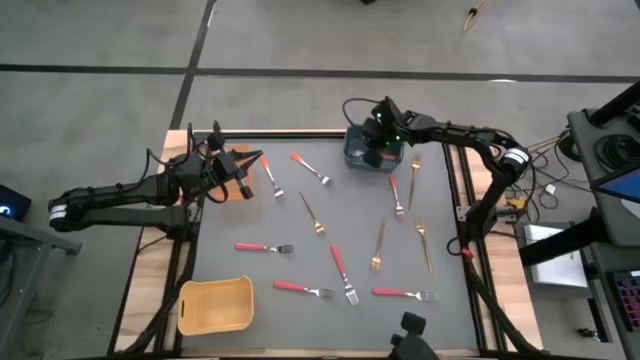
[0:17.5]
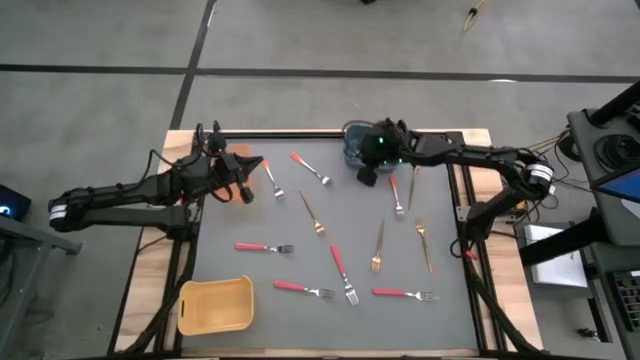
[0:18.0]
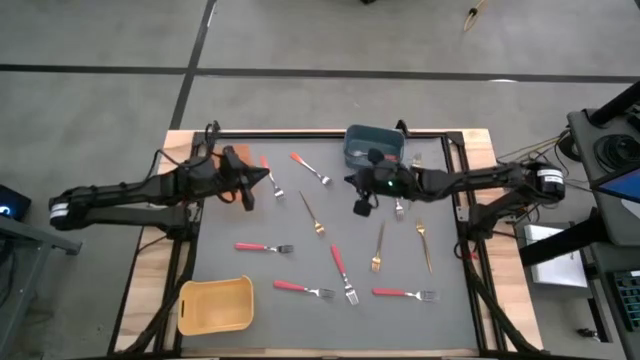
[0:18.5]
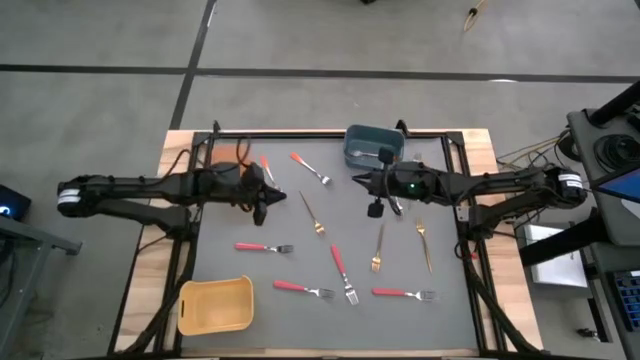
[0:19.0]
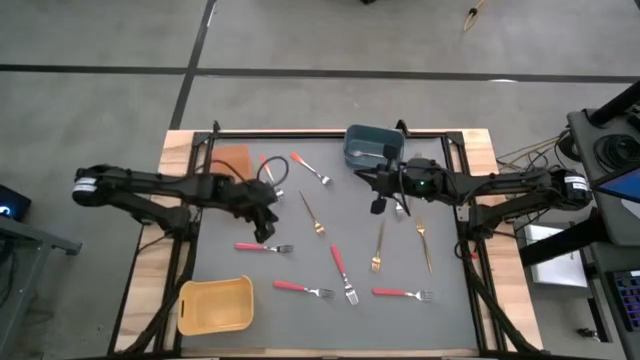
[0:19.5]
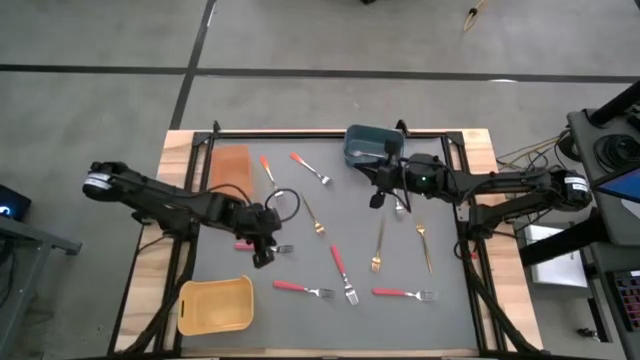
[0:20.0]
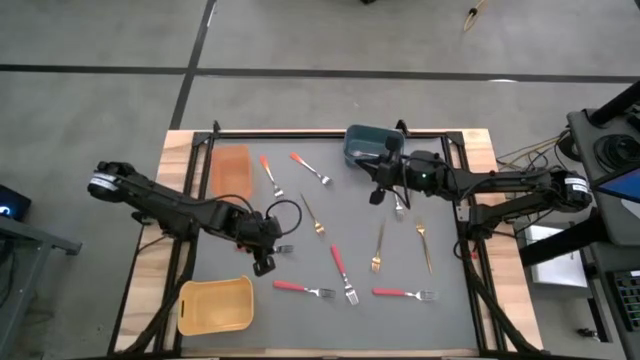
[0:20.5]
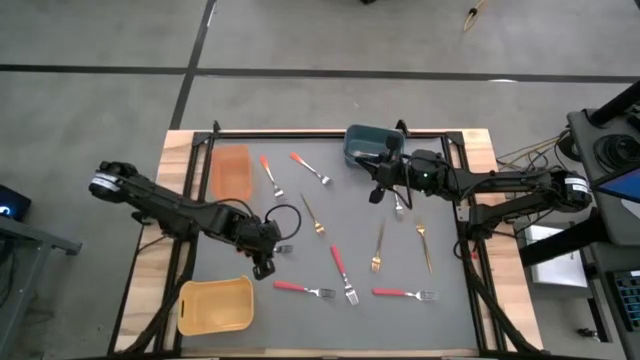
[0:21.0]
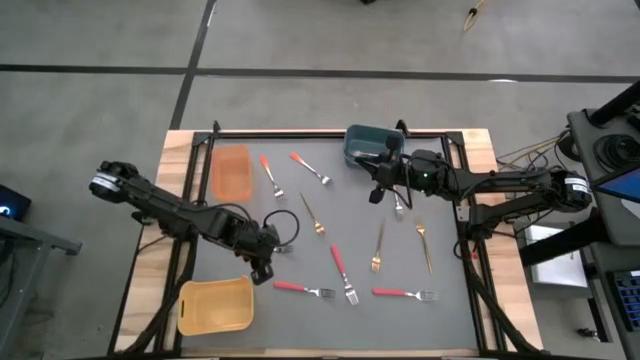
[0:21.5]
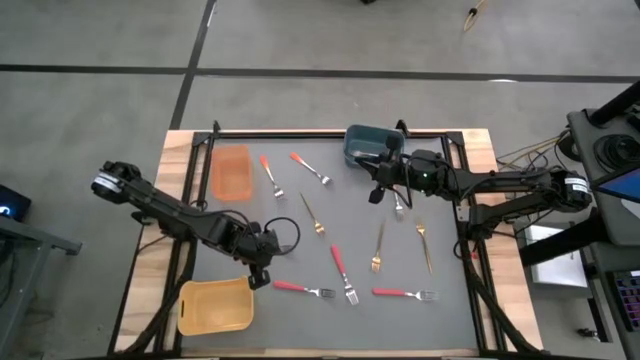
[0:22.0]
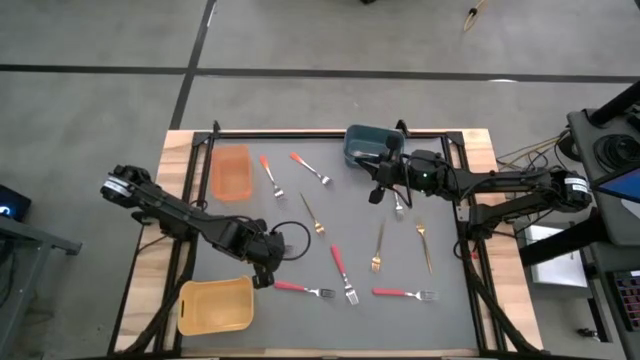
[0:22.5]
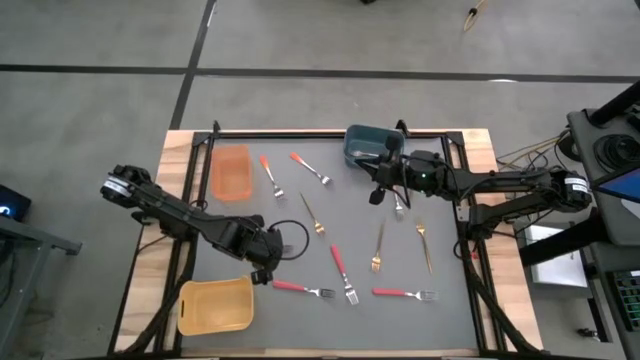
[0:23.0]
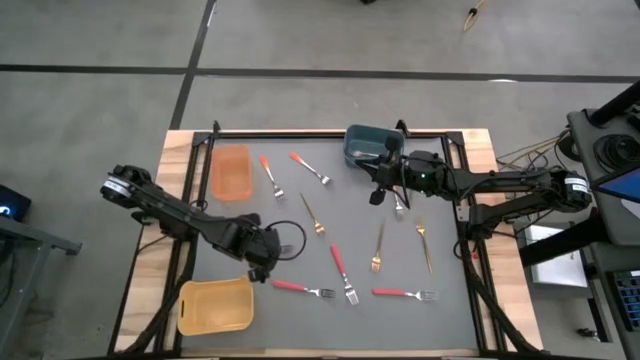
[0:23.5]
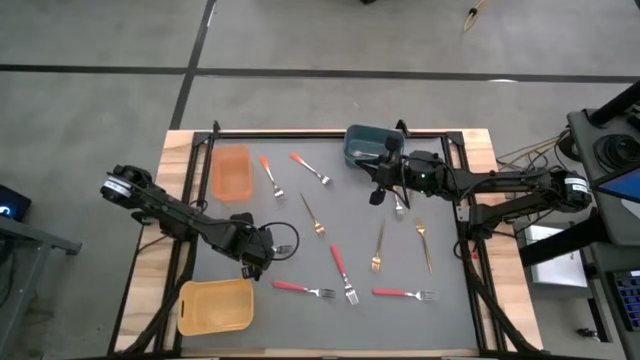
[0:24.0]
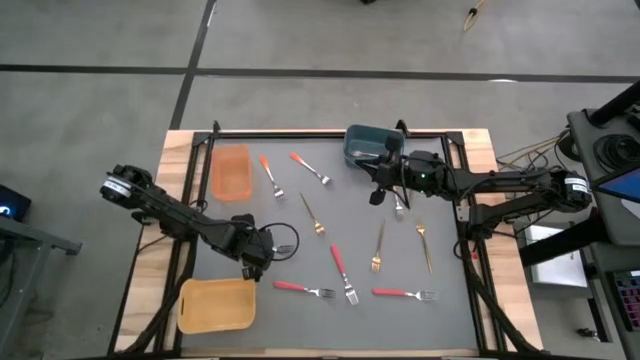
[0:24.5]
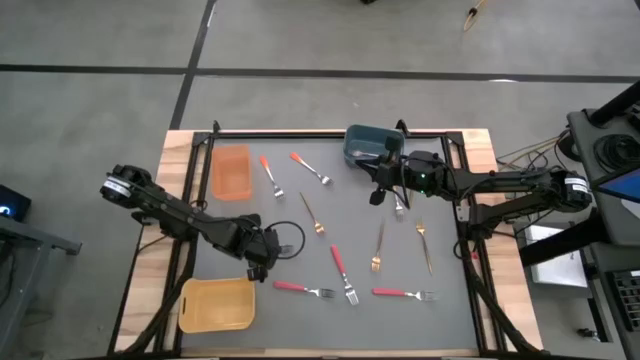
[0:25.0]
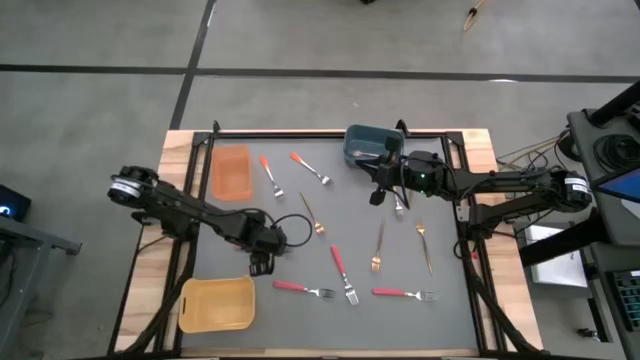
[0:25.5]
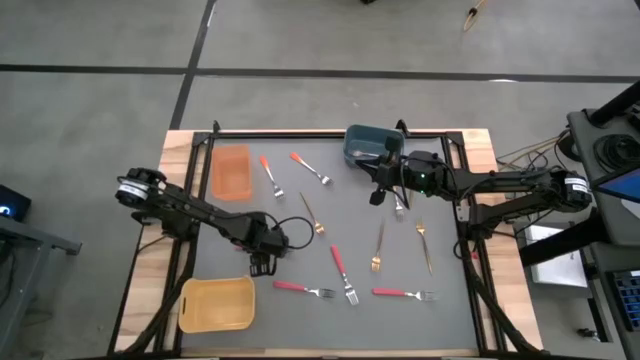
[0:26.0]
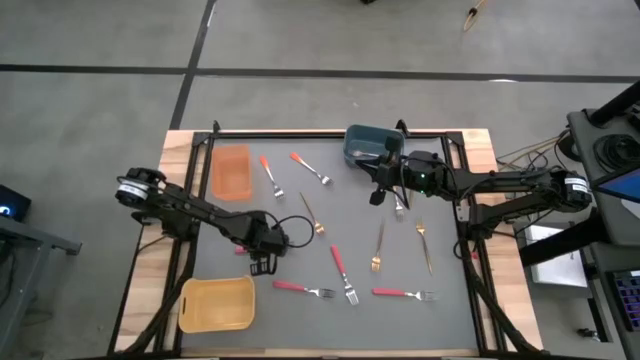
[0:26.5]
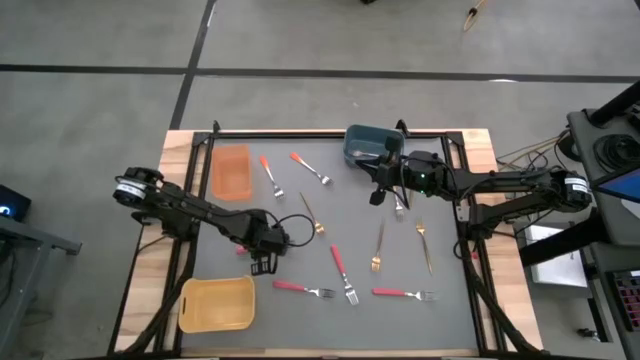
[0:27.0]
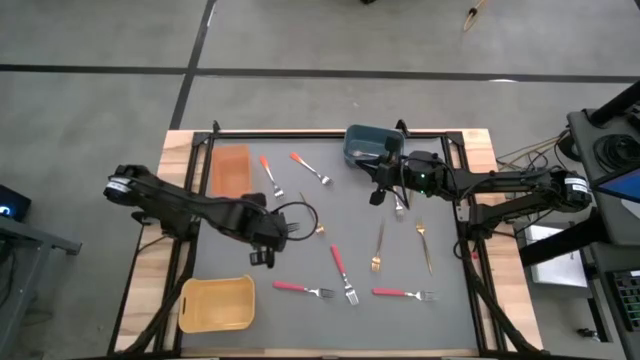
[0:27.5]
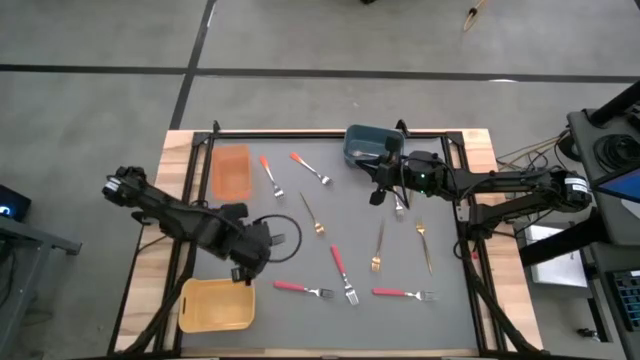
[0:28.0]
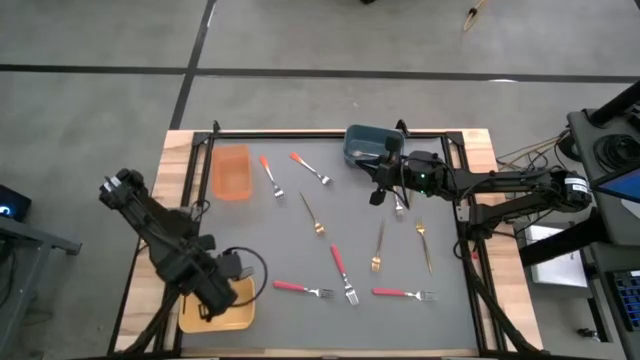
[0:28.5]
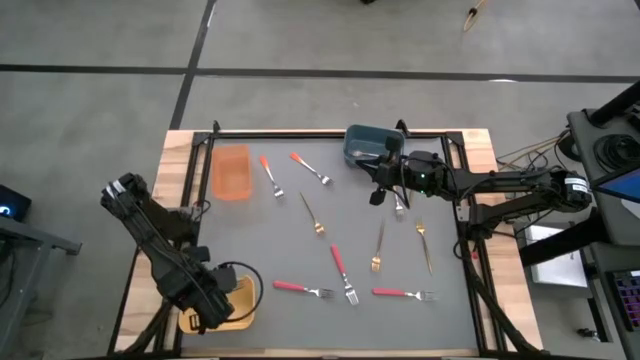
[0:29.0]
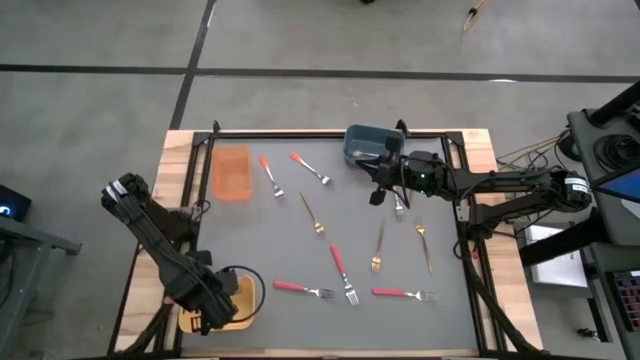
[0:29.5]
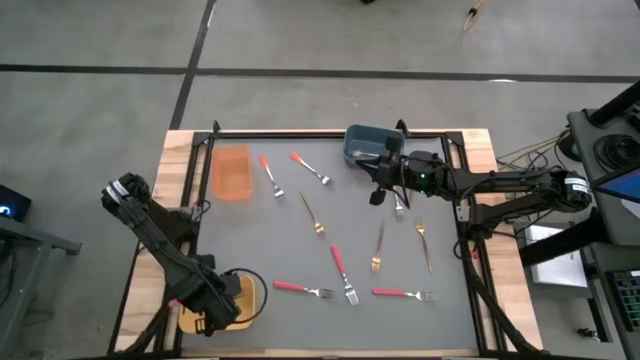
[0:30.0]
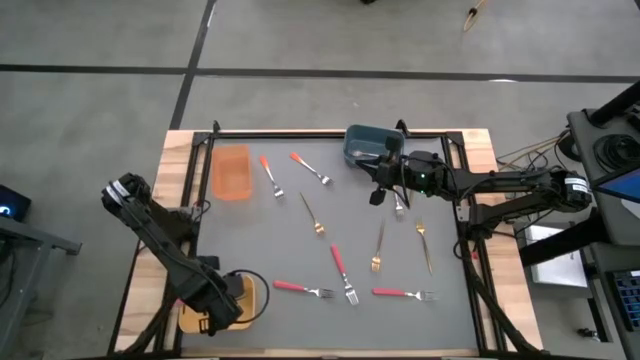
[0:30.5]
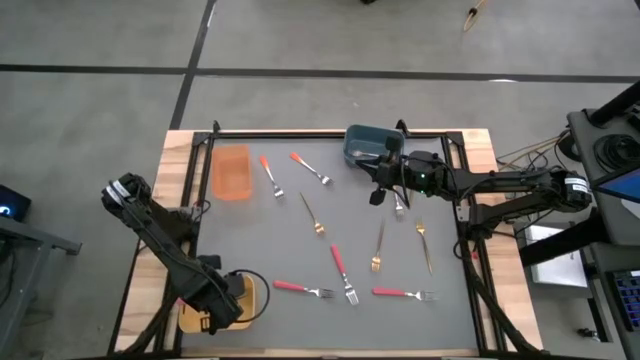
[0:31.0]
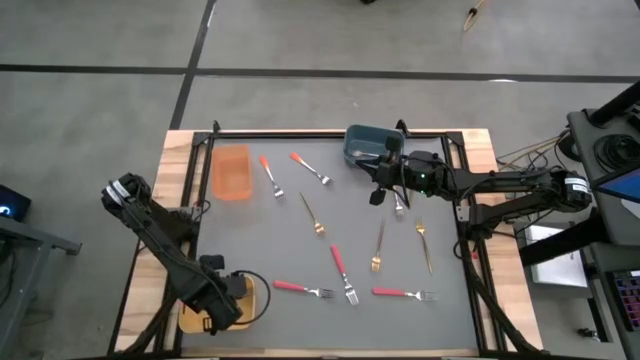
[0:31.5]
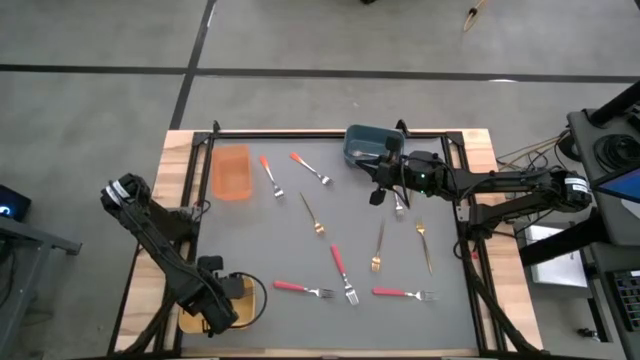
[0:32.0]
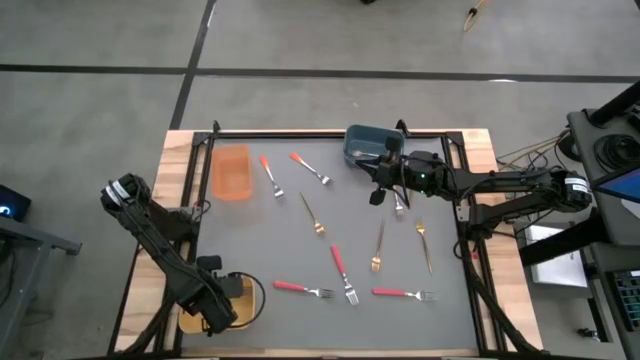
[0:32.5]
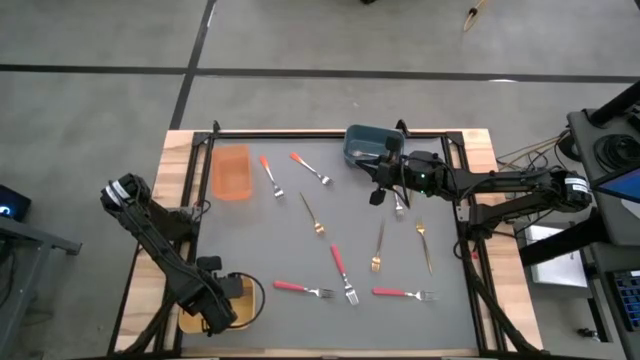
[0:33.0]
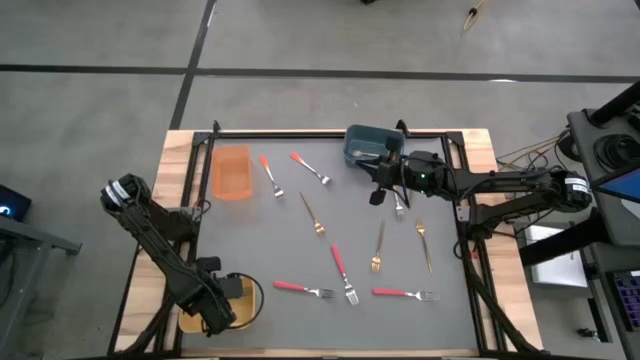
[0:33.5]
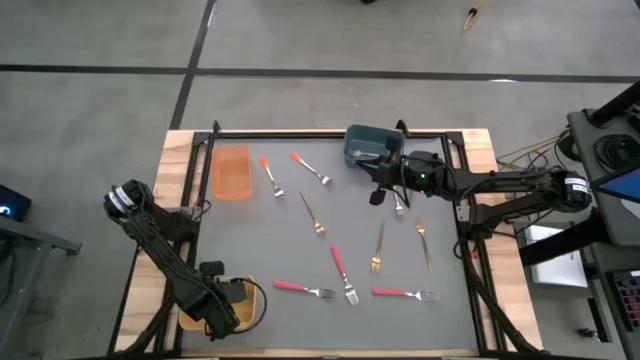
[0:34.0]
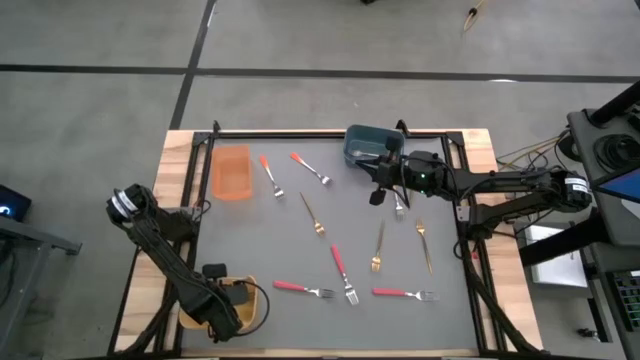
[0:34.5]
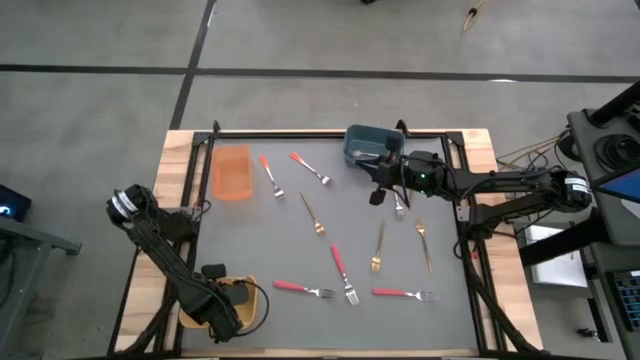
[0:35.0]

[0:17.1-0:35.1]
Task: Sort silverware by color (type)
Put the pink fork into the yellow bin

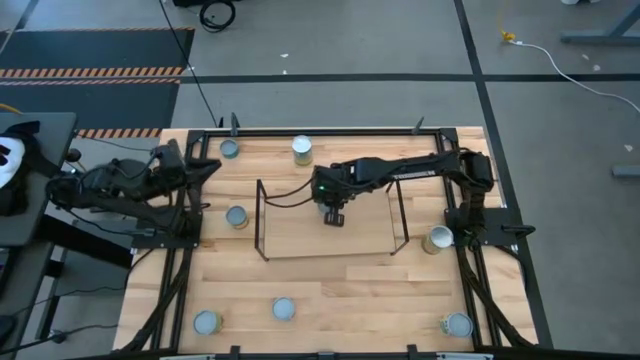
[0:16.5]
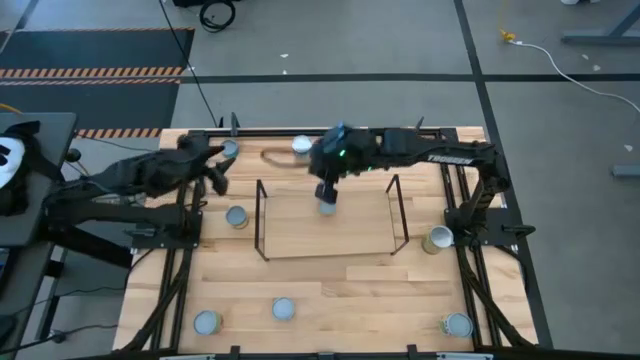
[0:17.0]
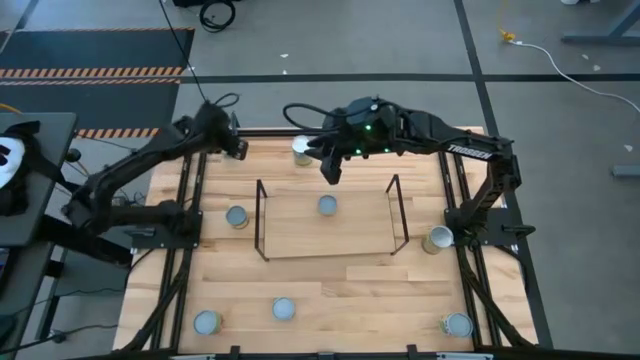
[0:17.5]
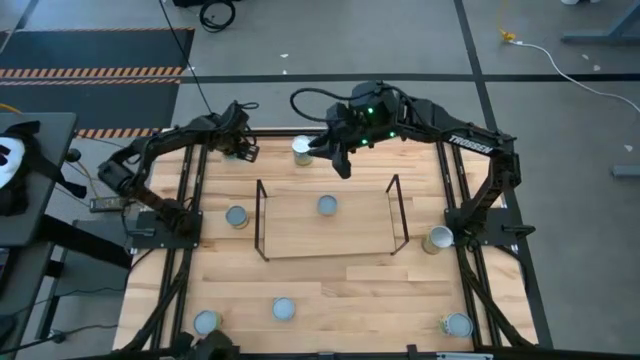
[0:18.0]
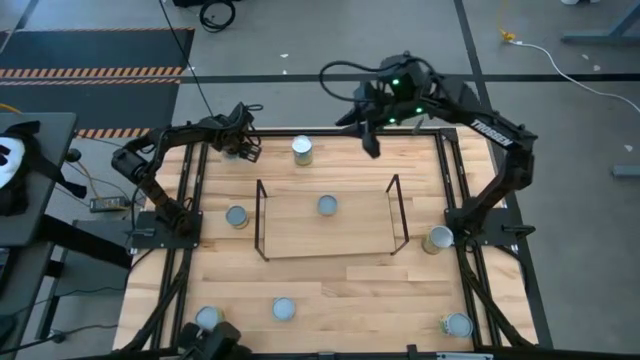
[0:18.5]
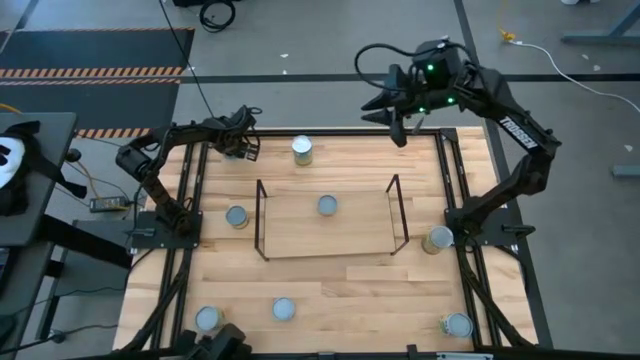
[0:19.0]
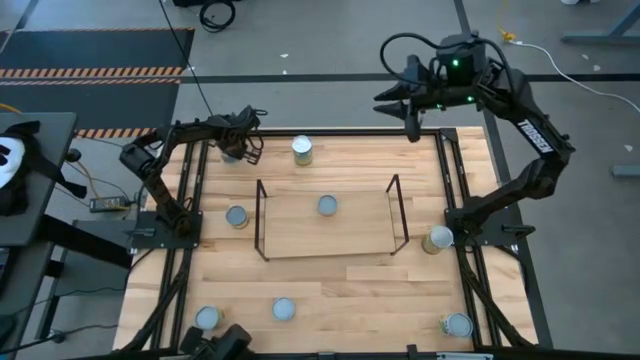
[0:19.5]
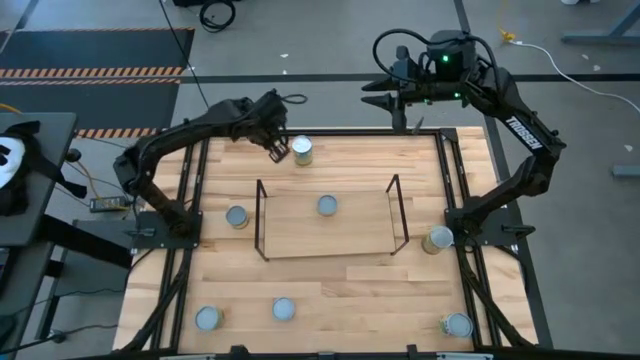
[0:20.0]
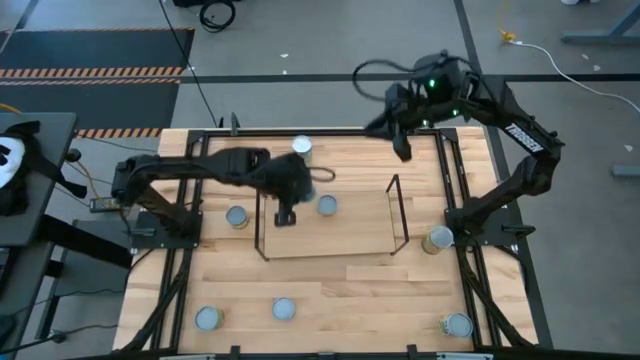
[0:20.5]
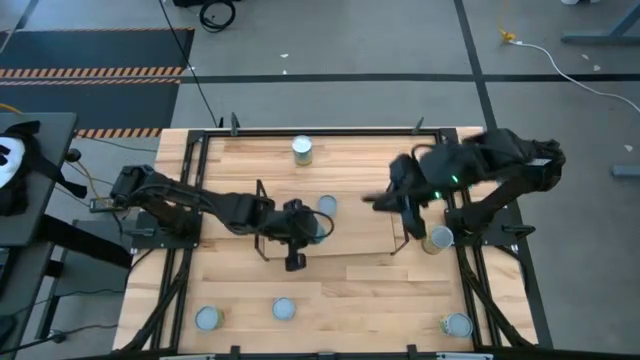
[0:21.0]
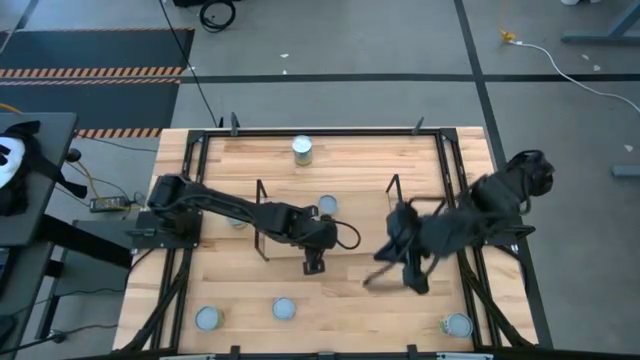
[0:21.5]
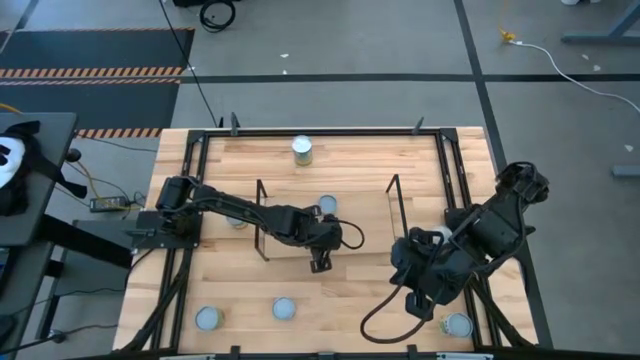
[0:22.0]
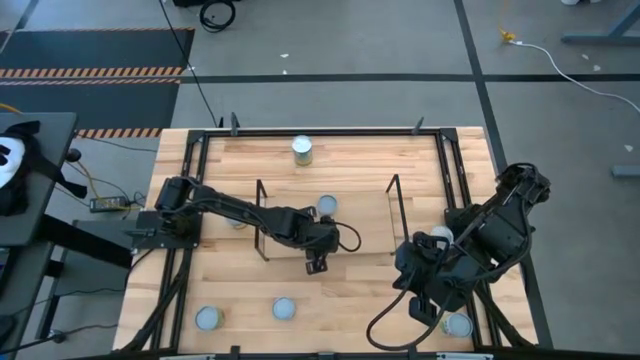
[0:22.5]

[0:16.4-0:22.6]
Task: Pick and place cans onto a shelf
Put the canned tuna on the shelf
